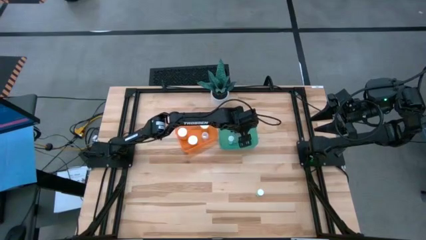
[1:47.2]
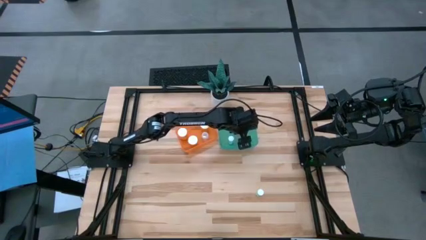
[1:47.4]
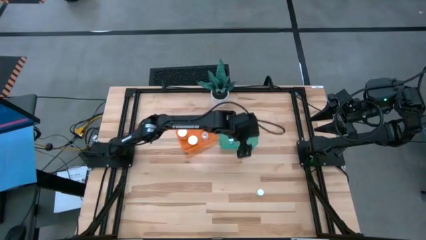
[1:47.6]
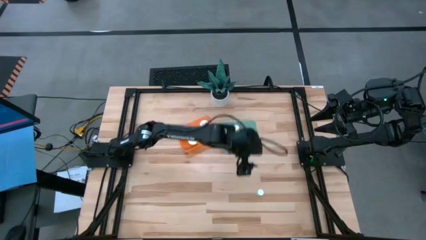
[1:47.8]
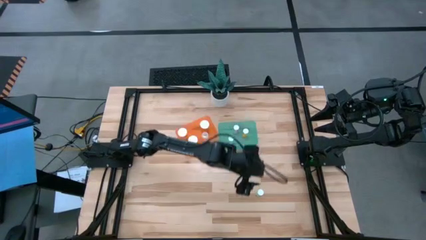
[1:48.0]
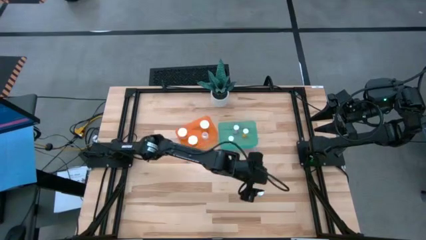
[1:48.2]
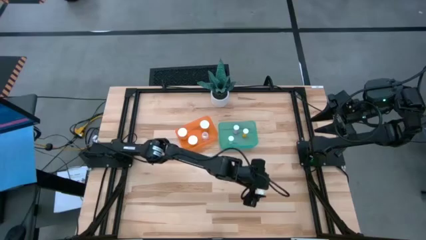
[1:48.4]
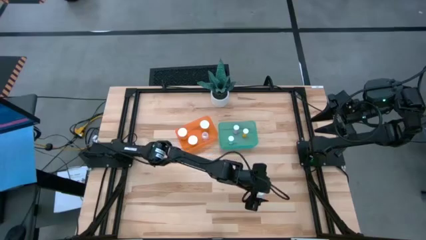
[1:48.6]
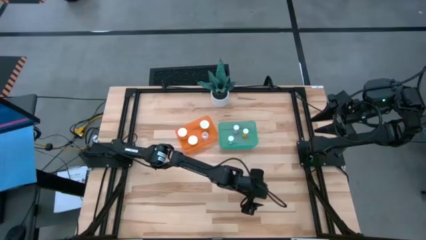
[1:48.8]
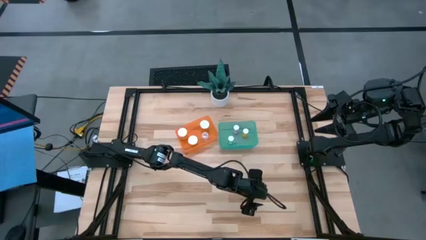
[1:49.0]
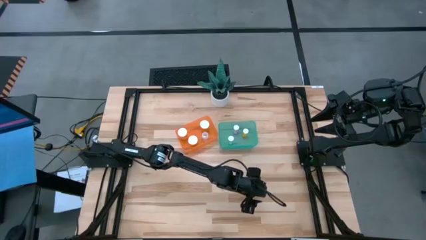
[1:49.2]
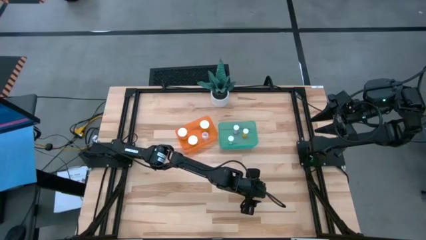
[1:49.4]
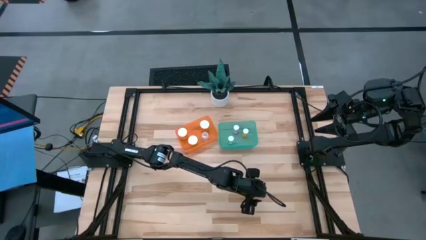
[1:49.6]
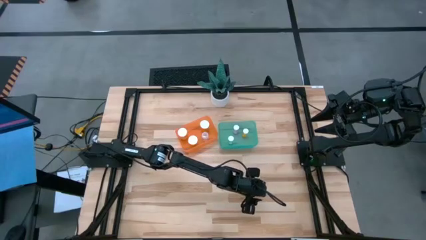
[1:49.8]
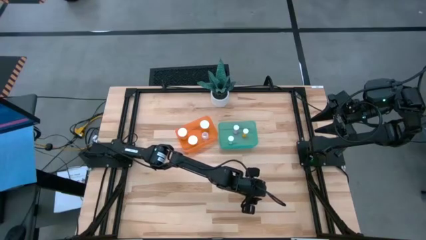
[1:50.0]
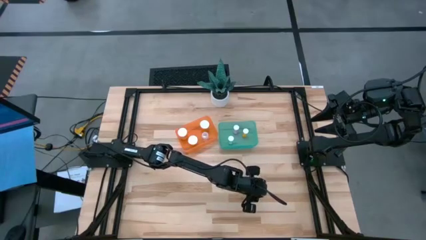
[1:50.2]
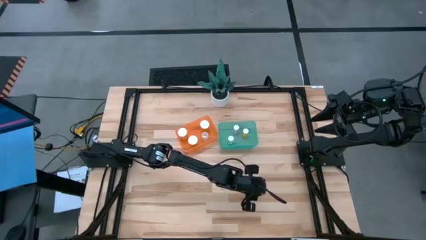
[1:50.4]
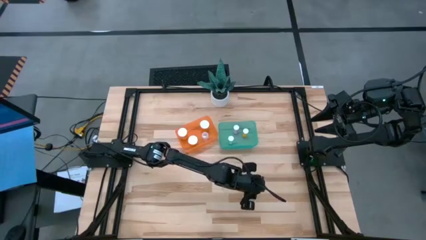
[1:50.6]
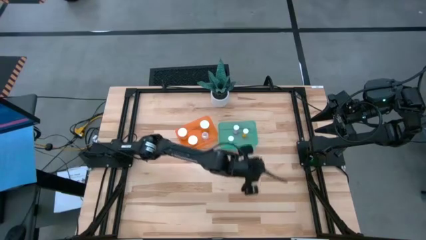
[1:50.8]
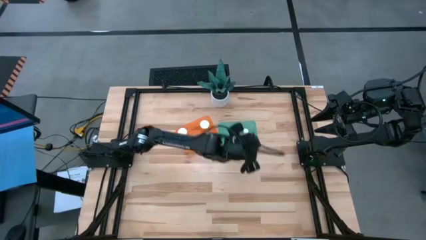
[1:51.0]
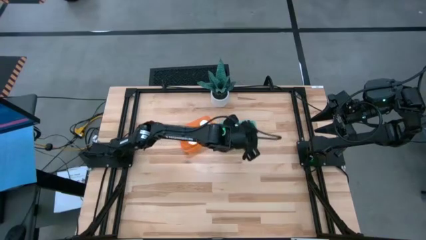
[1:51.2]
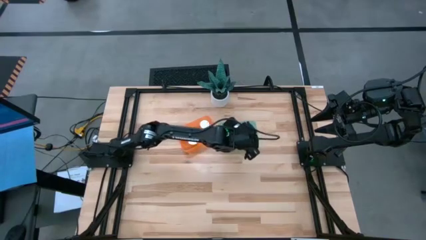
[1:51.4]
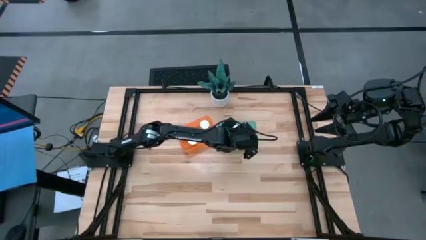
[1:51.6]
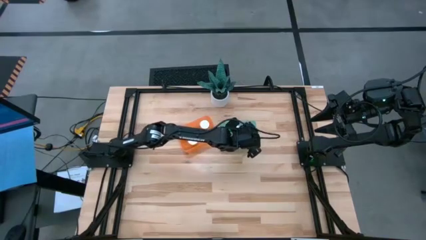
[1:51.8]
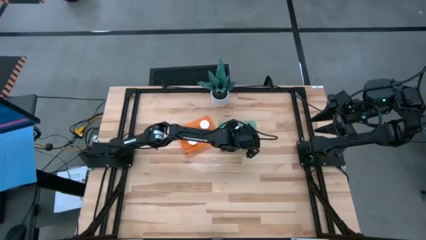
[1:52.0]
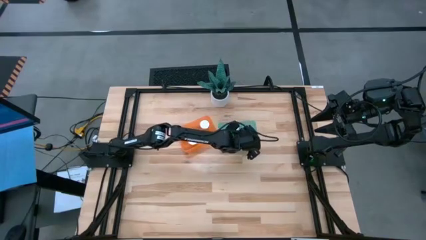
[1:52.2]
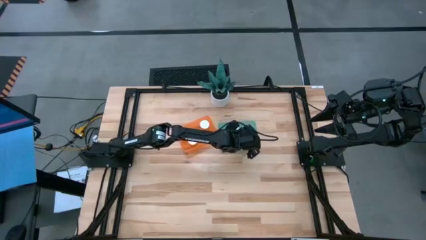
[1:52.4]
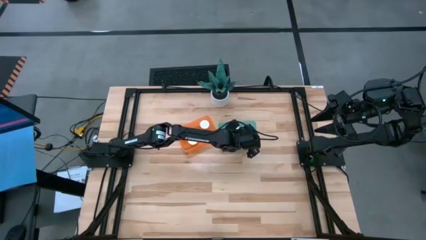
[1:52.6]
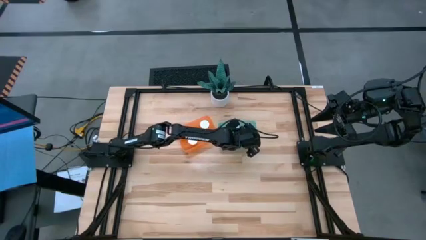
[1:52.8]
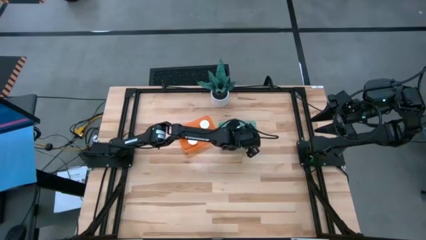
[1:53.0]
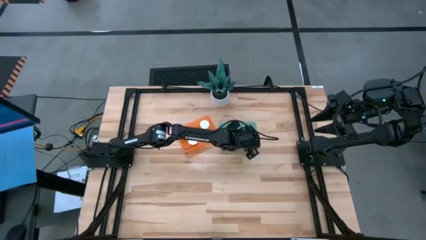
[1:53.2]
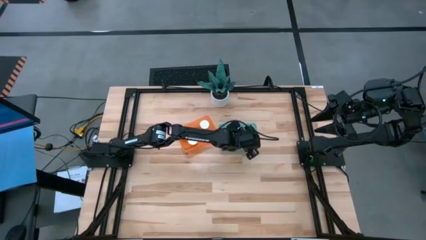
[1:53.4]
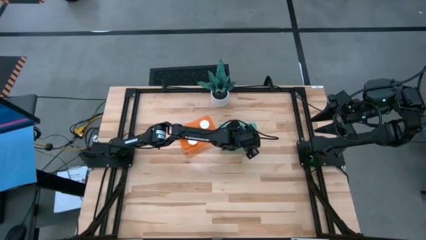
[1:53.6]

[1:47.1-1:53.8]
Task: Pick and place medicine bottles into bin by pill shape (circle, oval)
Put the blue tablet bottle into the blue bin

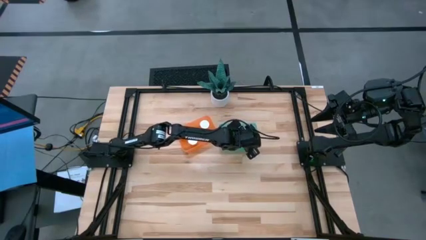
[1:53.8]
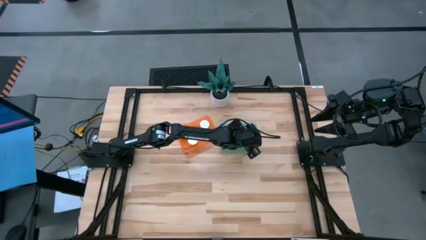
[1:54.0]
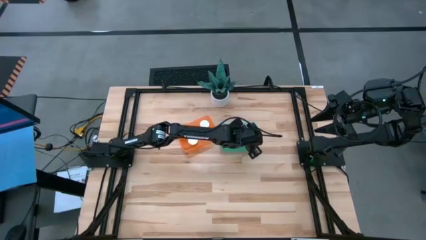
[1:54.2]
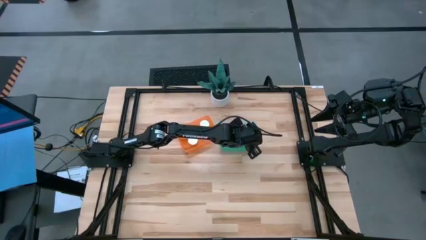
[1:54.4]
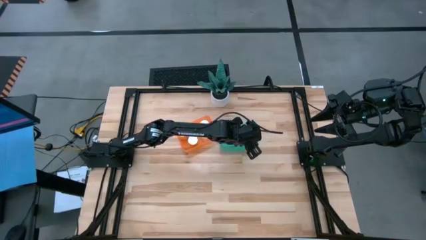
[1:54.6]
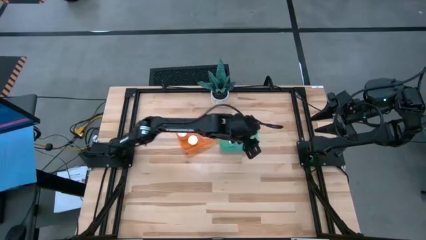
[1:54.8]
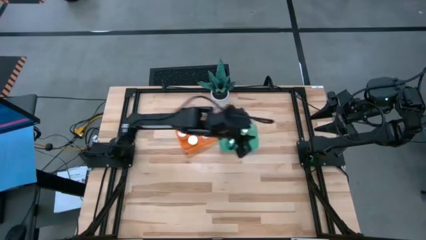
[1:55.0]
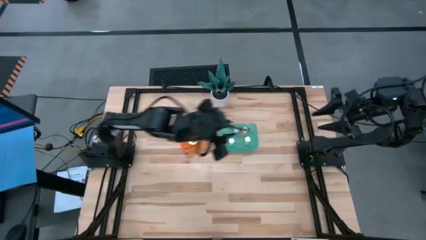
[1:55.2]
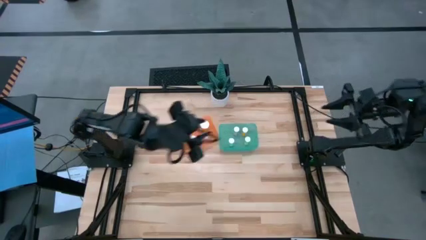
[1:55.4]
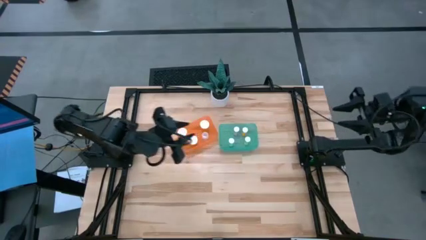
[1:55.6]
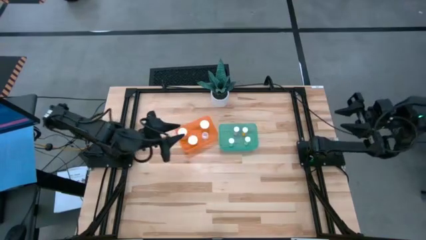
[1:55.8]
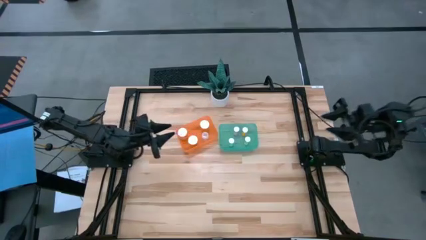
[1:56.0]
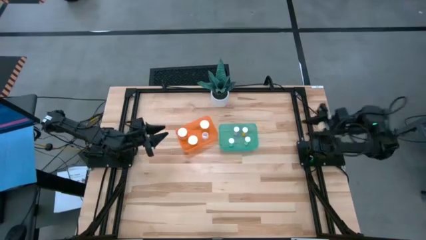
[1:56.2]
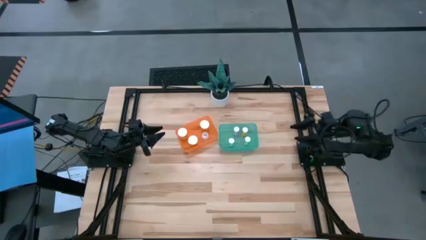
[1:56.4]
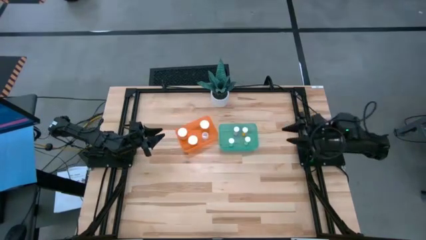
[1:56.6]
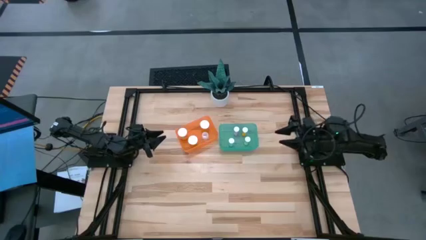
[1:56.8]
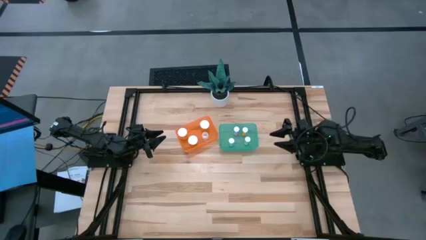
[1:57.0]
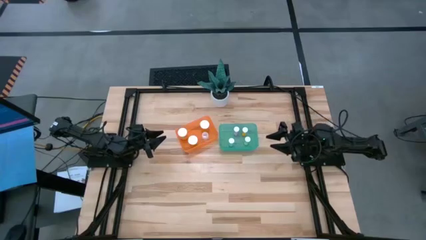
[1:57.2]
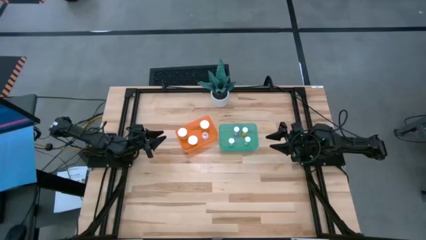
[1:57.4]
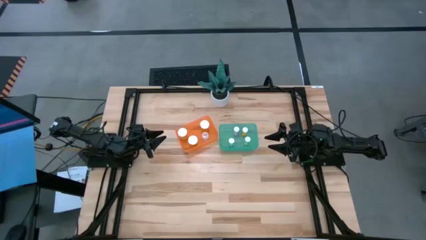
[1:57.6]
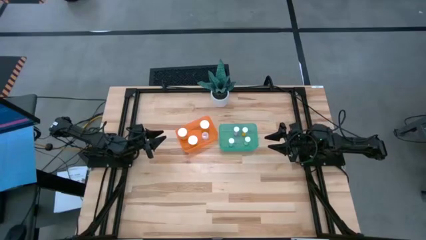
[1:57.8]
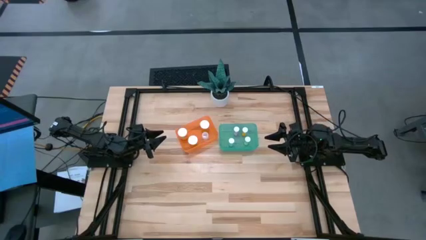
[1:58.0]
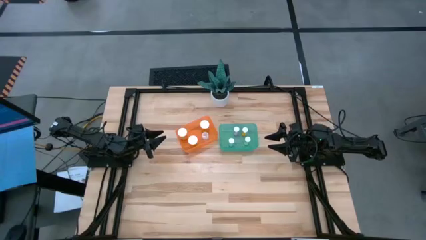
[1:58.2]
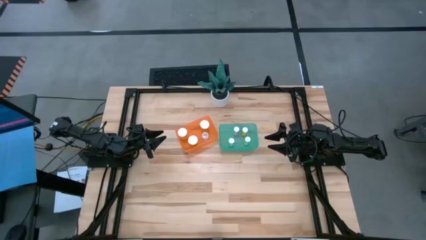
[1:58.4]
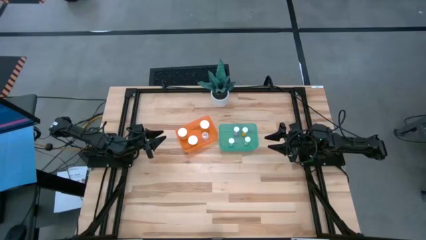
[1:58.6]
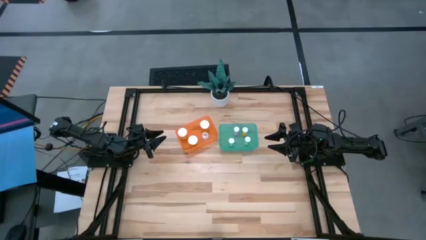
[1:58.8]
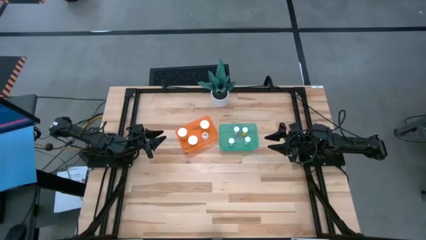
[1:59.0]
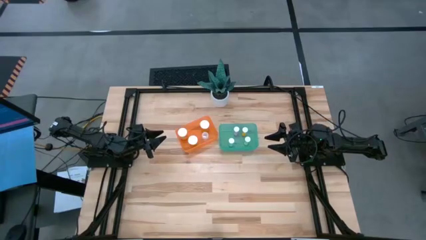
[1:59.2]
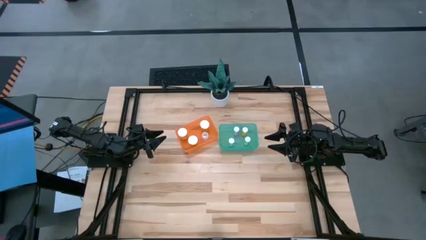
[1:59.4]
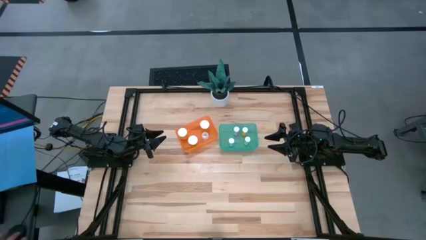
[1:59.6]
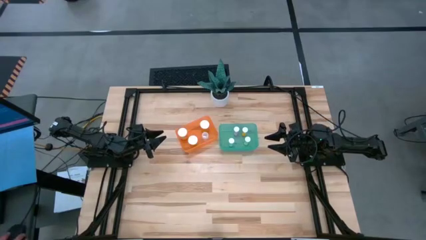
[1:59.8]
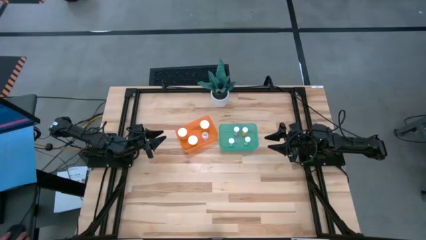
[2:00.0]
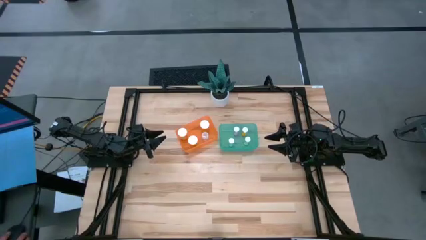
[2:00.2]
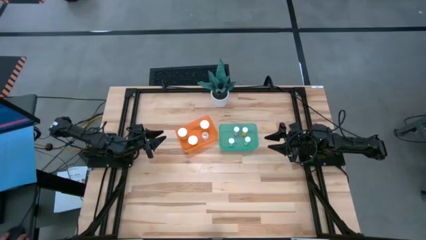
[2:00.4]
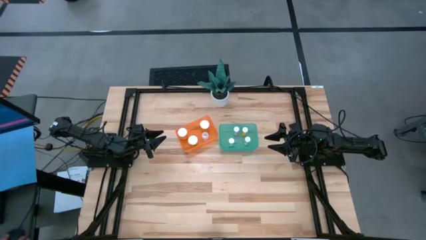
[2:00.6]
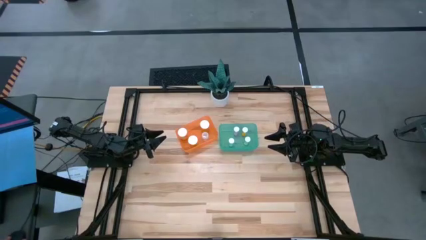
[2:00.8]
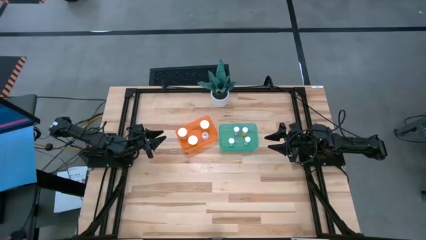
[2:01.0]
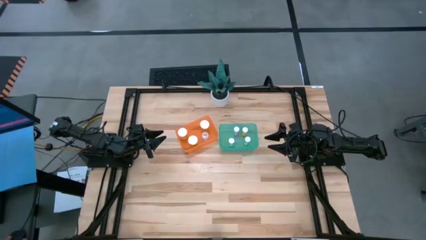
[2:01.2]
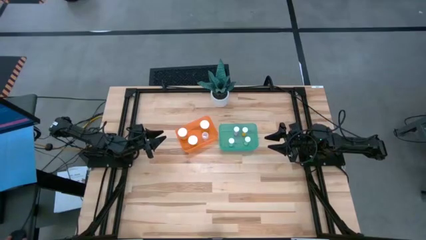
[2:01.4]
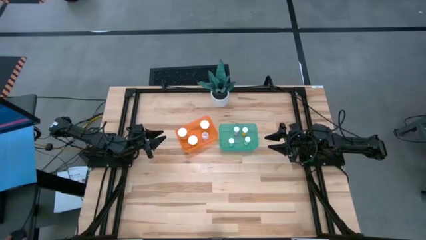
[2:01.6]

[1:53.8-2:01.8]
Return to Home Position
